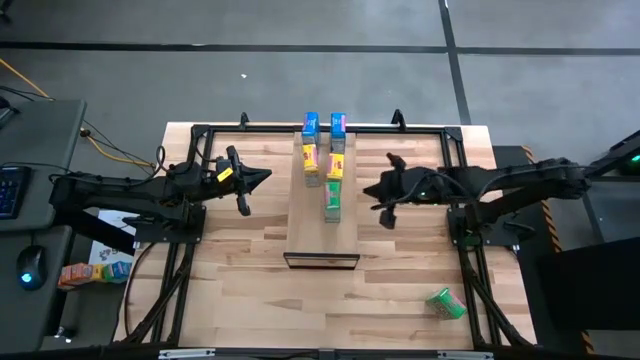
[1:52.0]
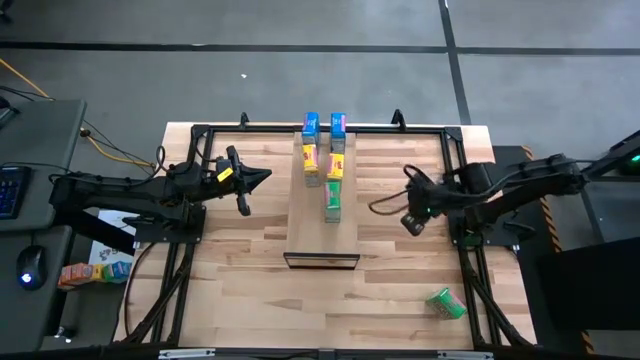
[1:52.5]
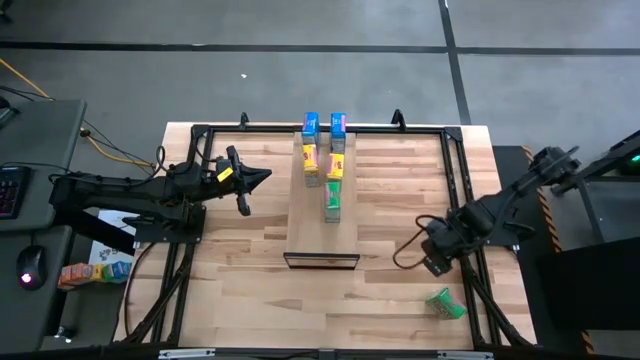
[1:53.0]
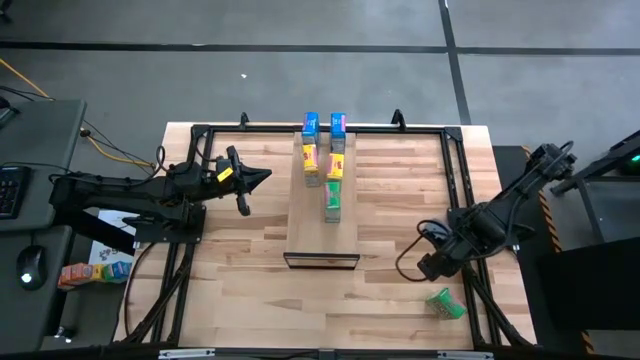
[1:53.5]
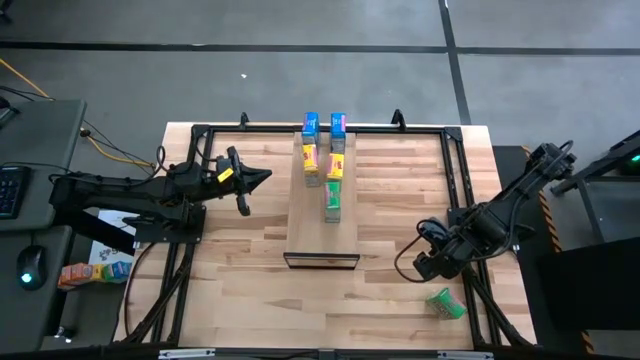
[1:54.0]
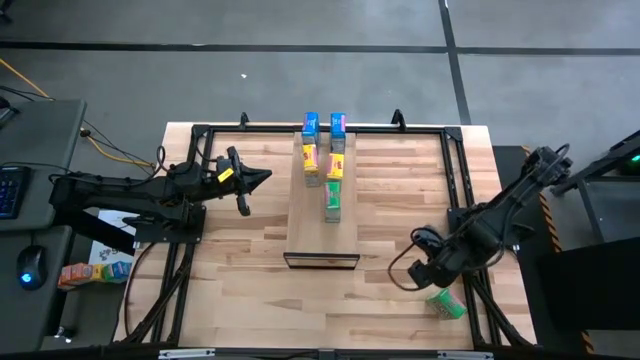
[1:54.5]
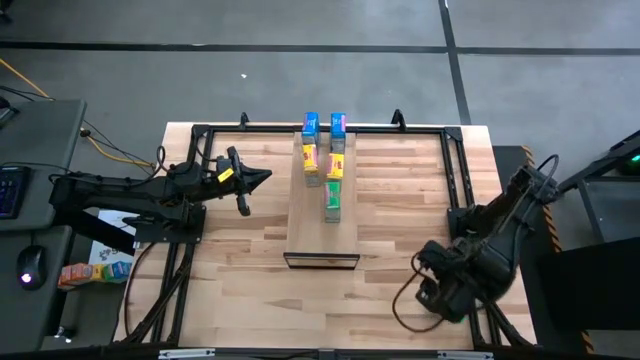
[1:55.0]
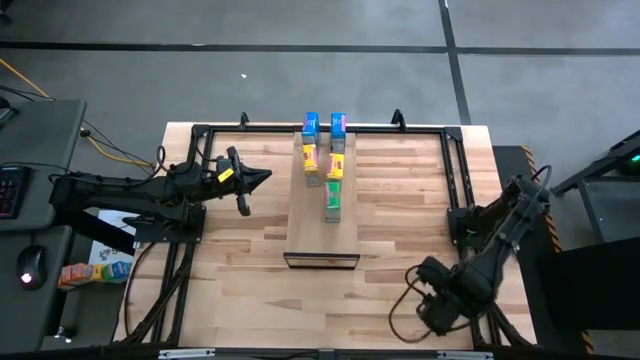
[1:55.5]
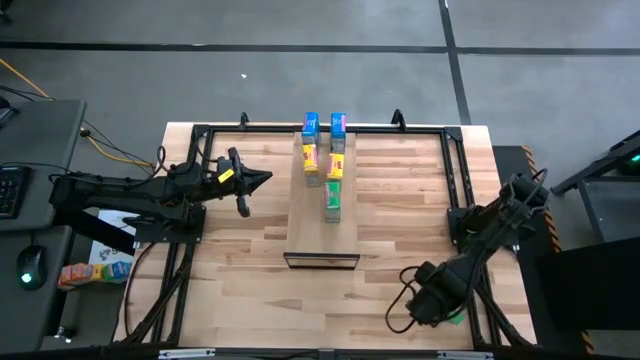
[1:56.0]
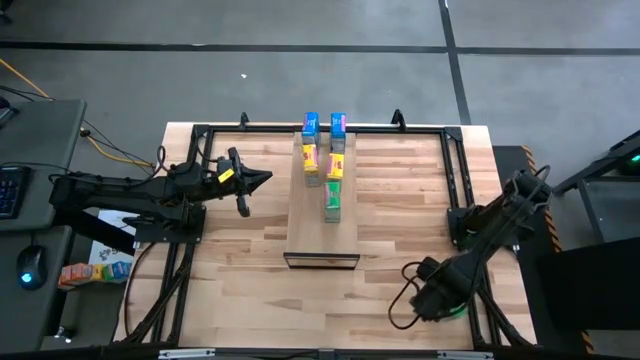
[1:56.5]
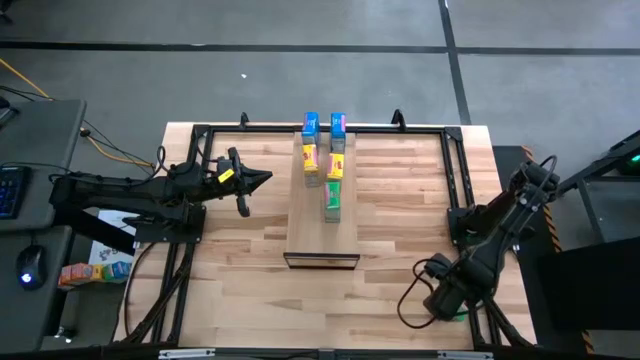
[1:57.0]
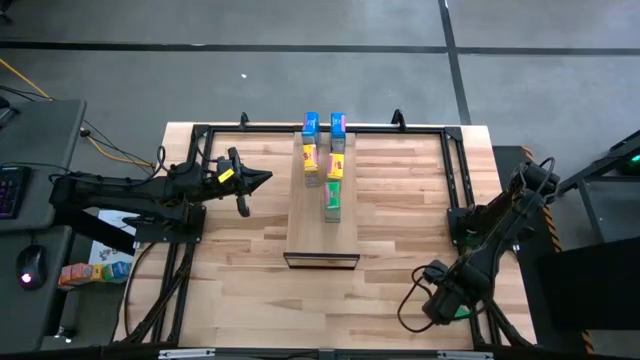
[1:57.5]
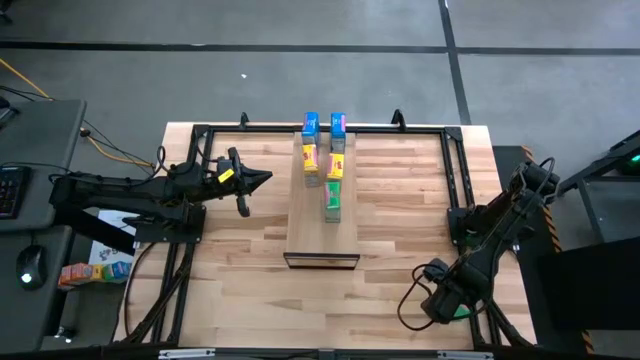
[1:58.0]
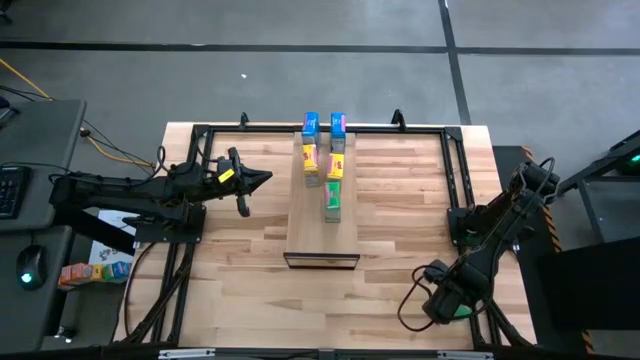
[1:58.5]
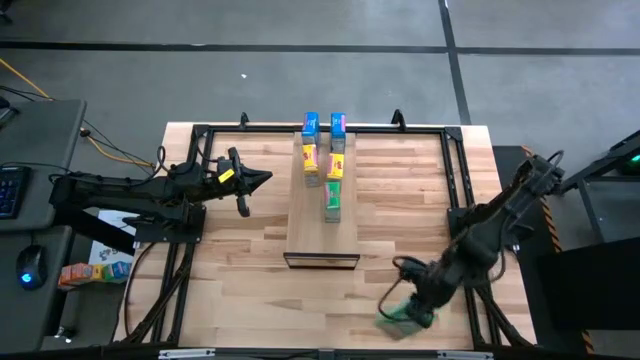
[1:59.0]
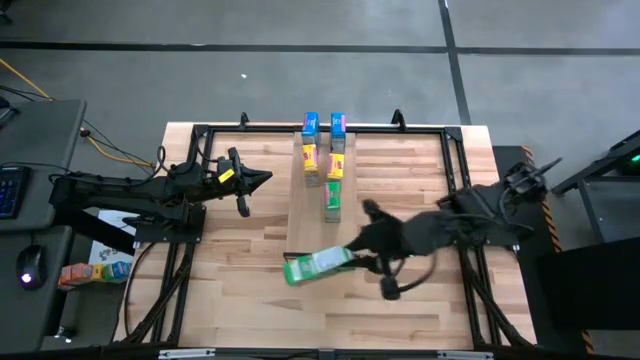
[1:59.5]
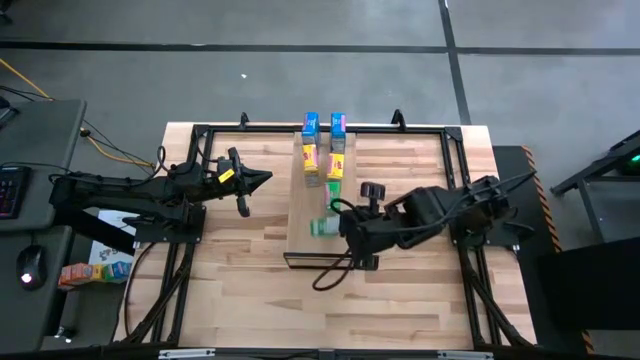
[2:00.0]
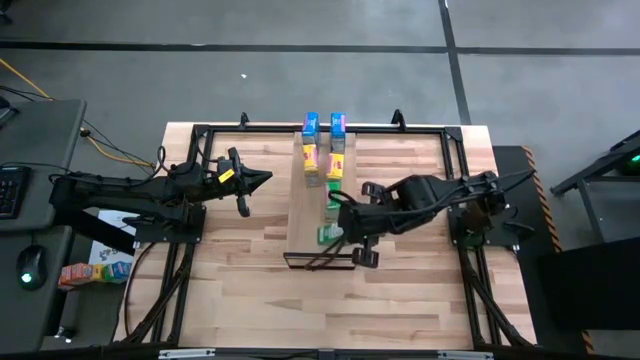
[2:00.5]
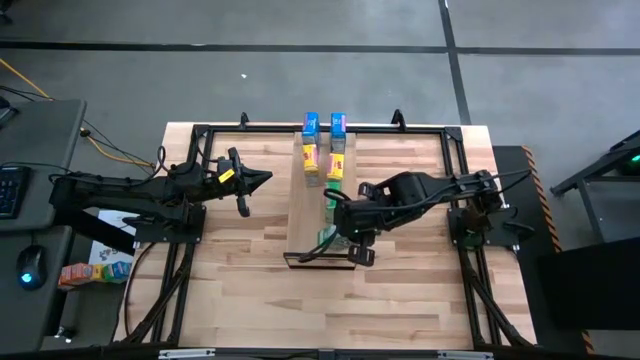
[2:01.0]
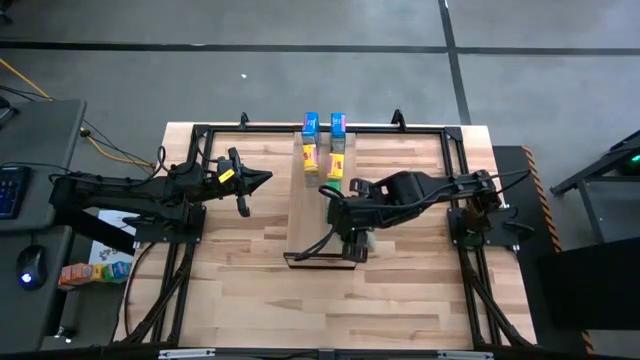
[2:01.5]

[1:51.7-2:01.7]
Task: Stack cereal on shelf
Put the green cereal box on the shelf

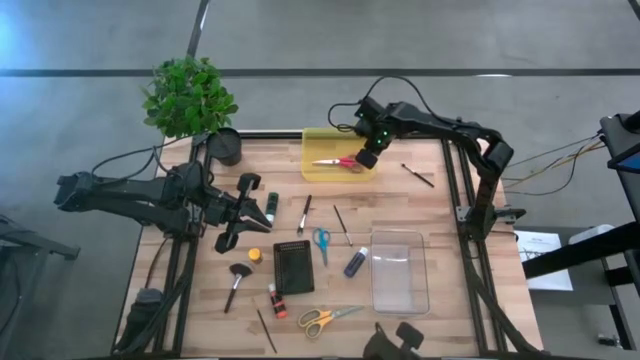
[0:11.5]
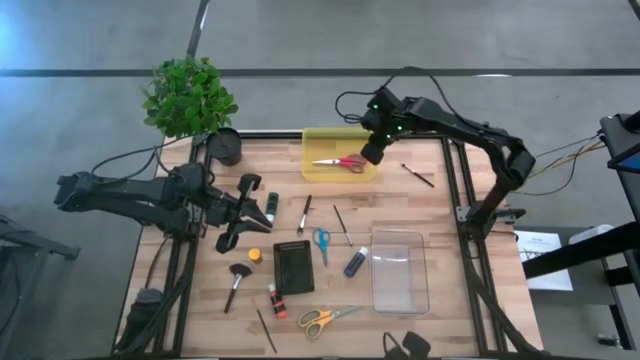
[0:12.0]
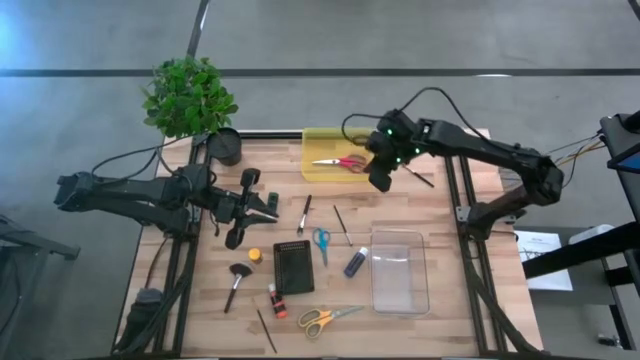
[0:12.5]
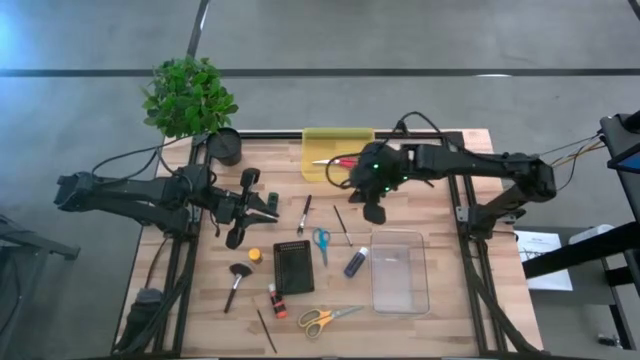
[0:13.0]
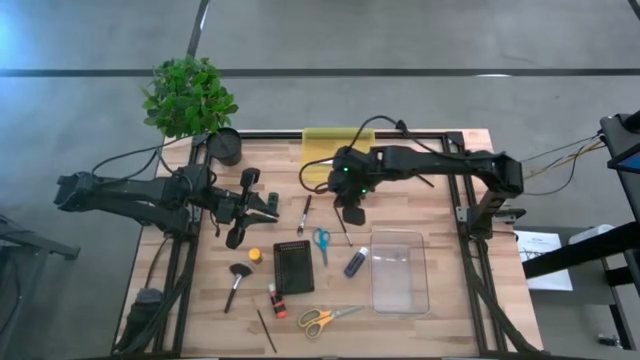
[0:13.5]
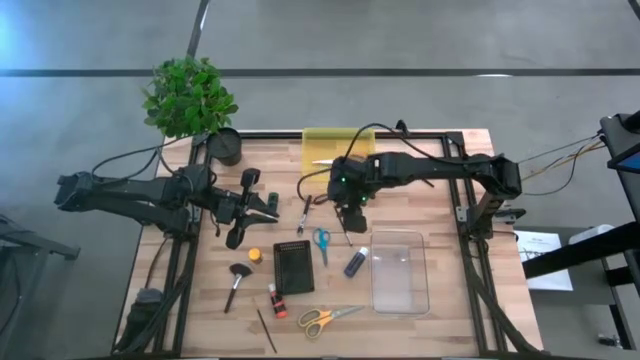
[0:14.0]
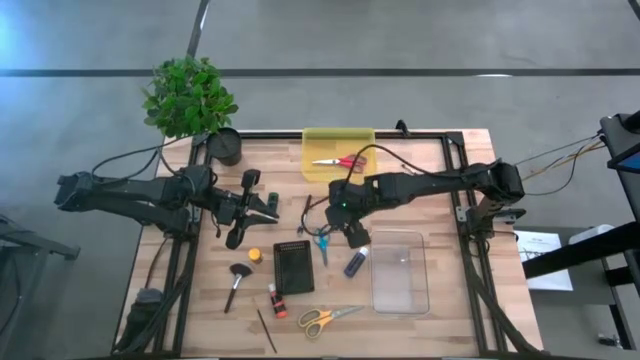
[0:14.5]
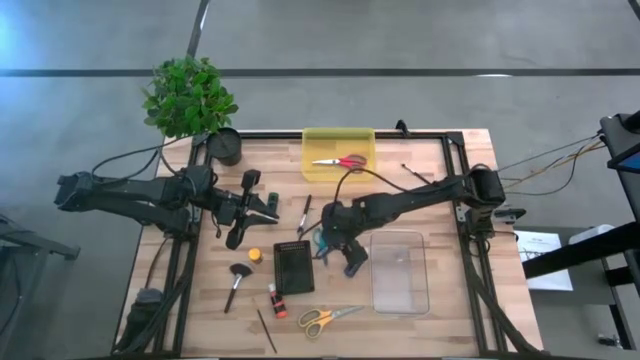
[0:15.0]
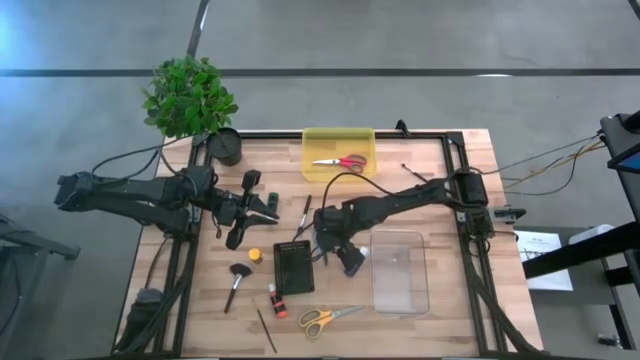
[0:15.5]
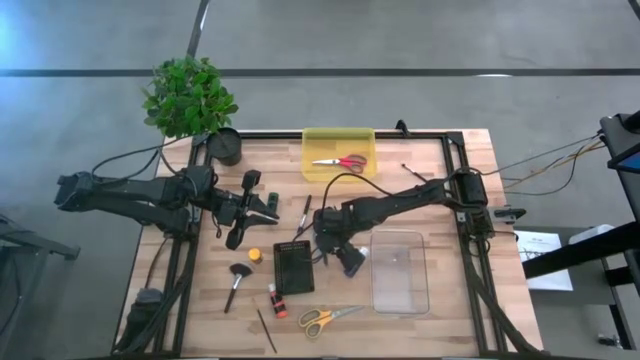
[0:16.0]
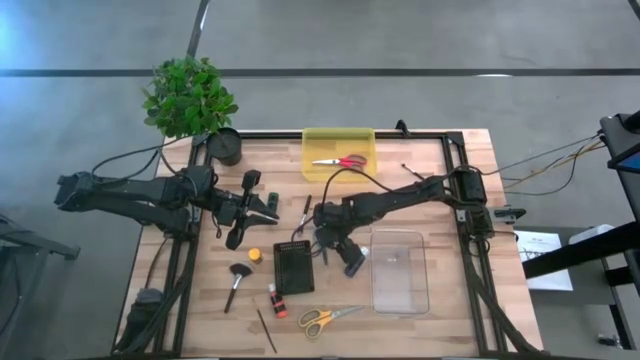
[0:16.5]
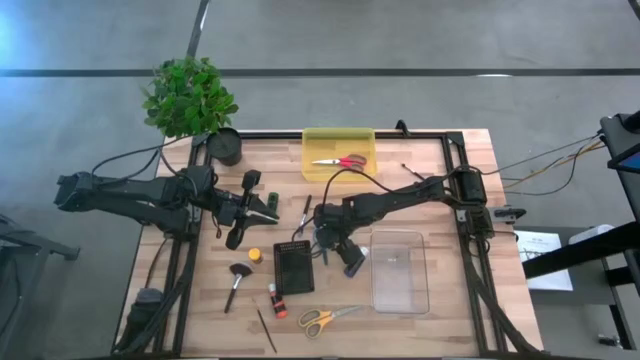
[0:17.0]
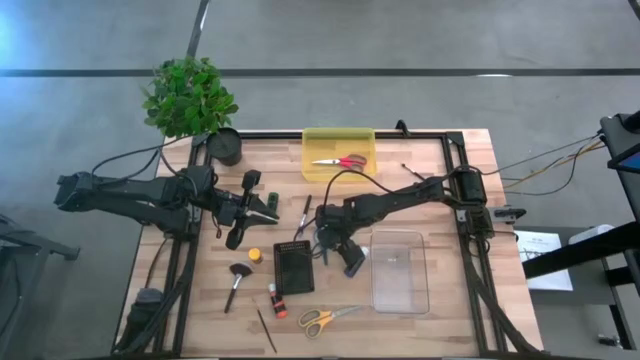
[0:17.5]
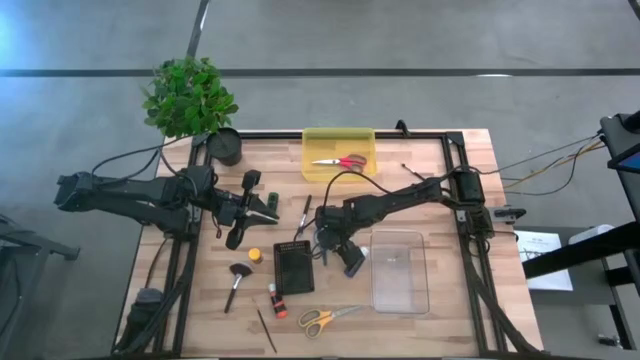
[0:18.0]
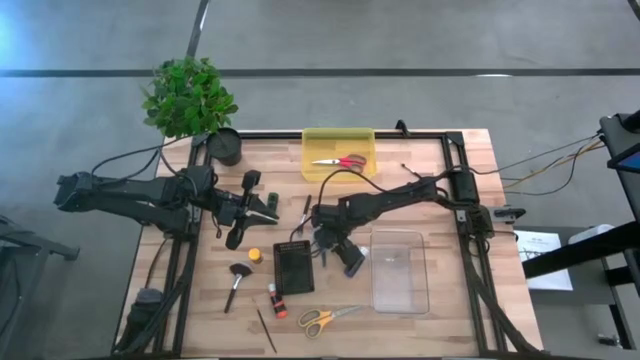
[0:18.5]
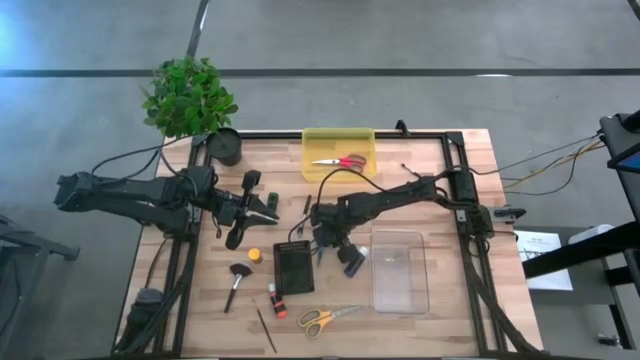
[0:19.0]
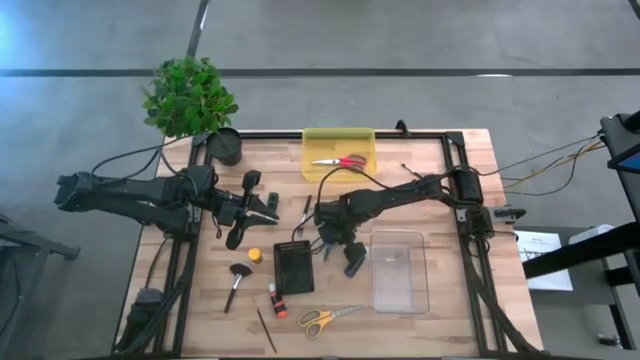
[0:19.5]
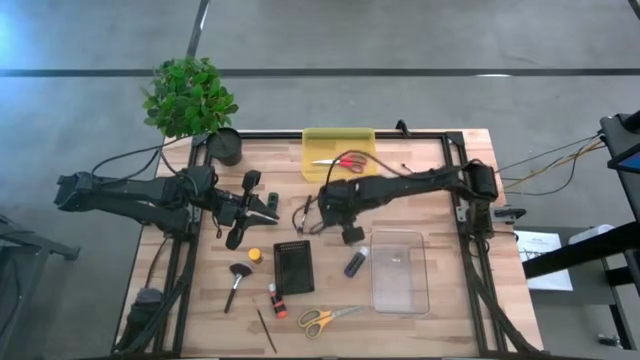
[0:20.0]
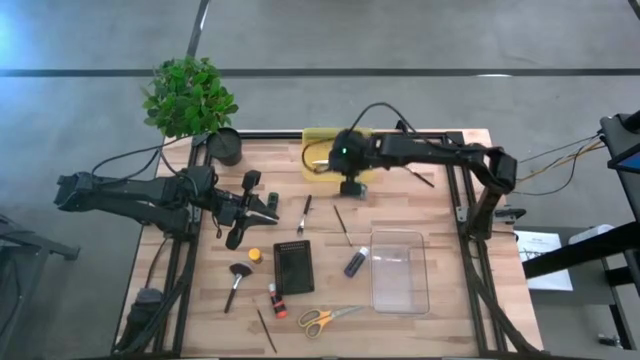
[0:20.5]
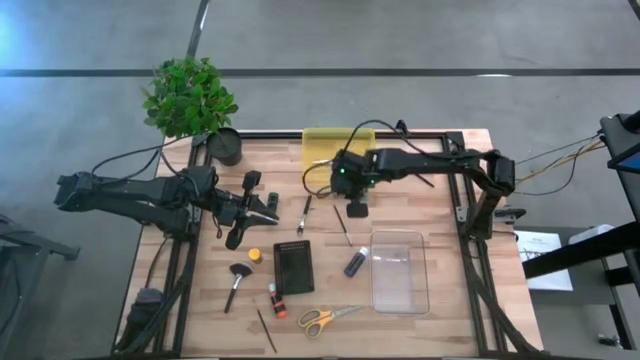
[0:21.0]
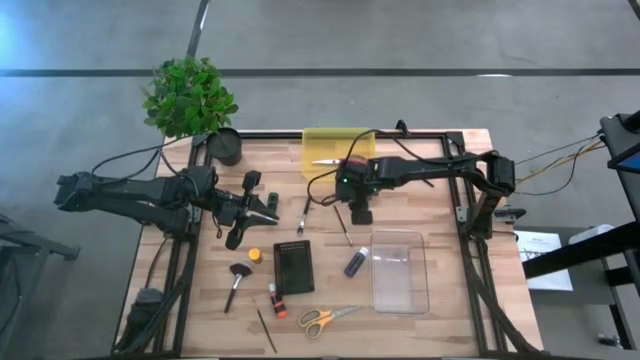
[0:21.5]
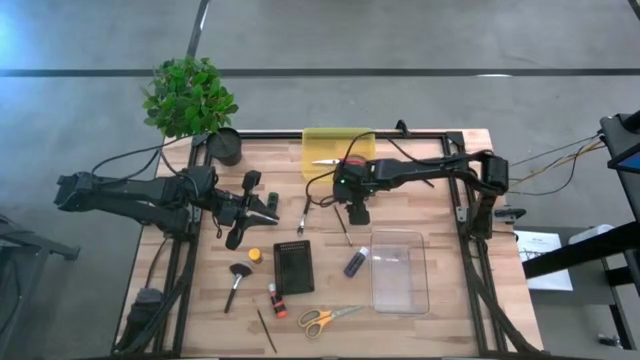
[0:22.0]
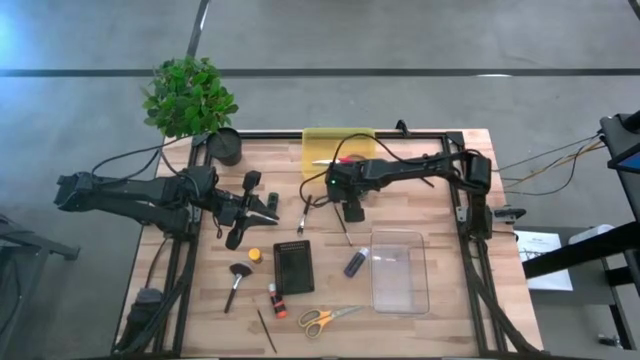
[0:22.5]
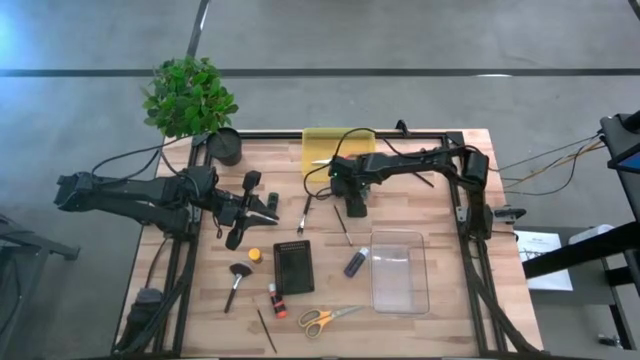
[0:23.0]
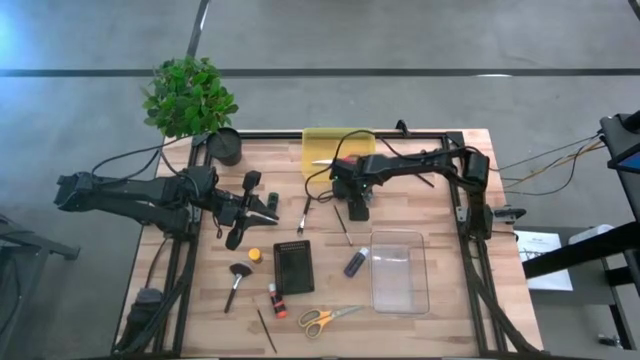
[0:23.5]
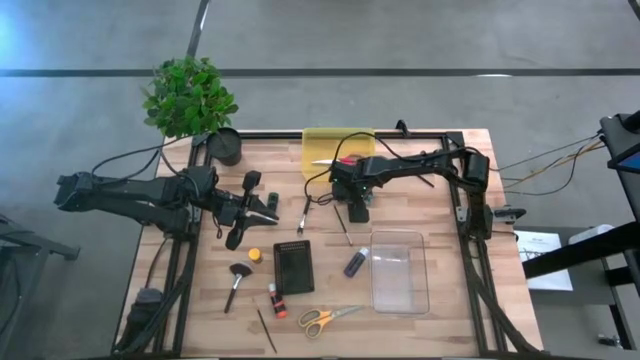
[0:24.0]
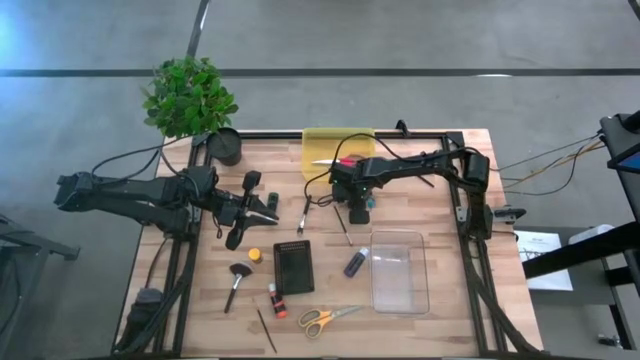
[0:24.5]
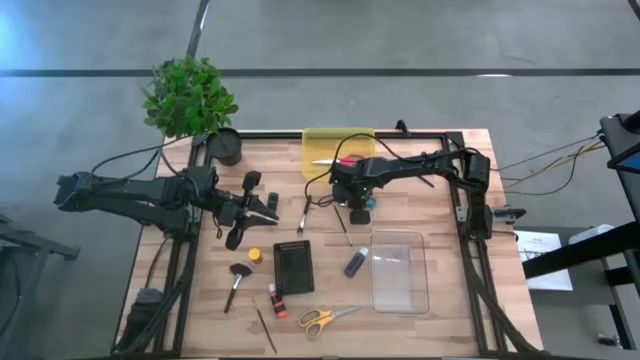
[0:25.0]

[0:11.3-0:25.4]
Task: Pick & Place Paint Supplies
Put the blue scissors into the yellow bin
